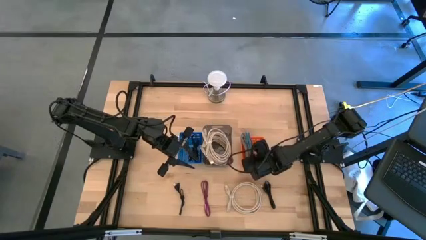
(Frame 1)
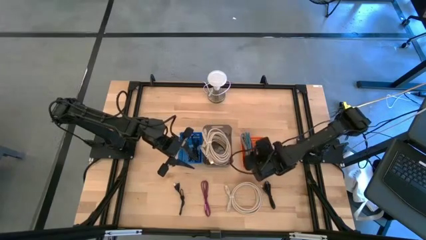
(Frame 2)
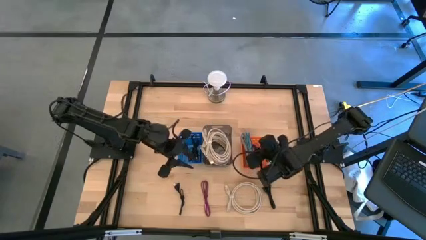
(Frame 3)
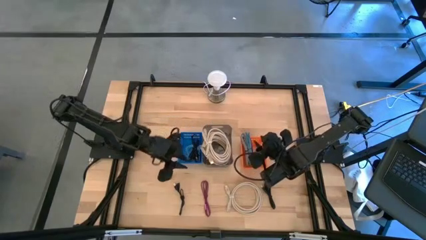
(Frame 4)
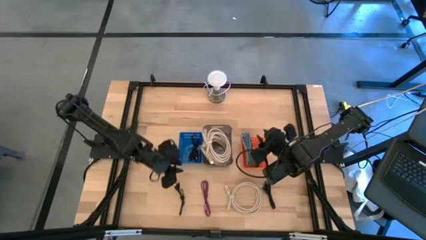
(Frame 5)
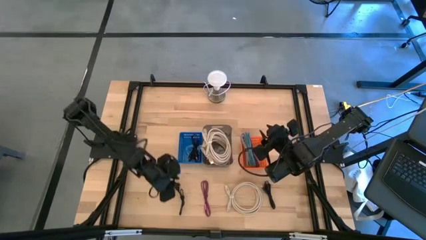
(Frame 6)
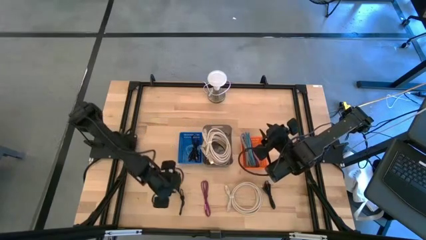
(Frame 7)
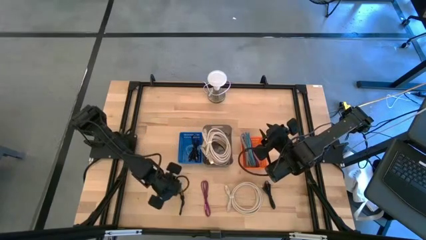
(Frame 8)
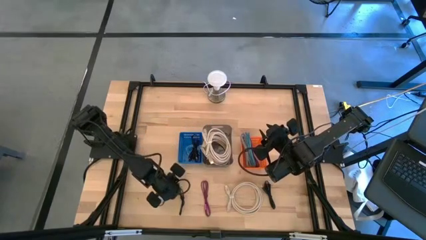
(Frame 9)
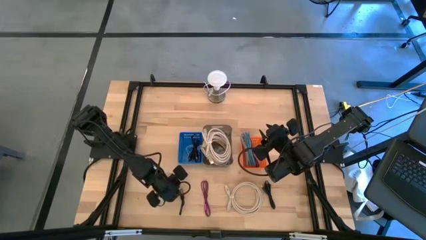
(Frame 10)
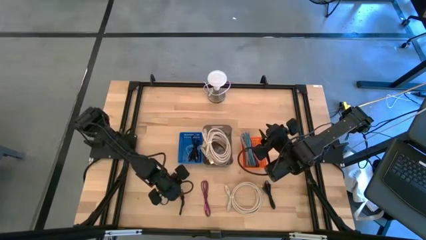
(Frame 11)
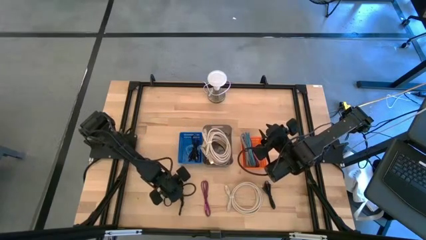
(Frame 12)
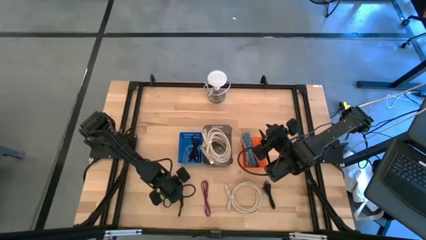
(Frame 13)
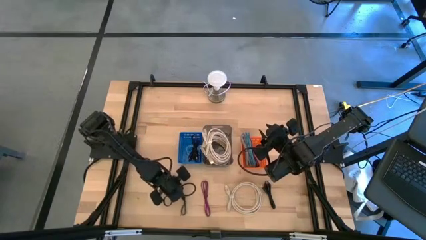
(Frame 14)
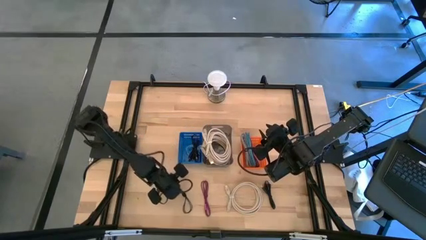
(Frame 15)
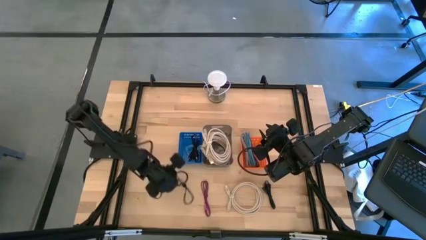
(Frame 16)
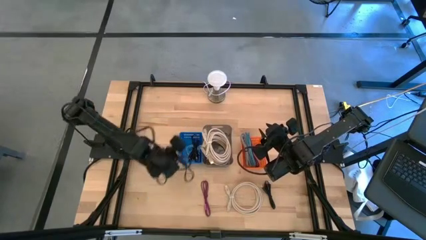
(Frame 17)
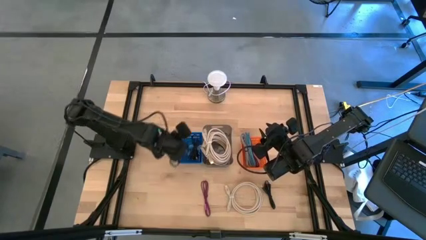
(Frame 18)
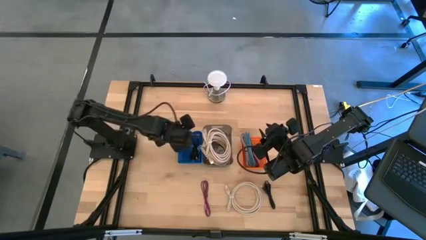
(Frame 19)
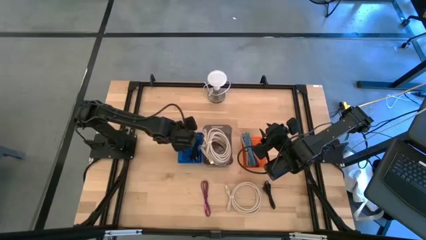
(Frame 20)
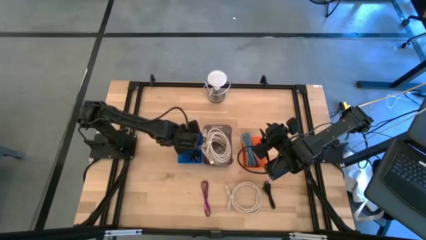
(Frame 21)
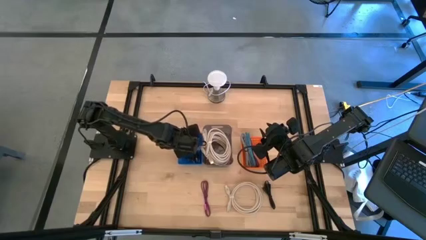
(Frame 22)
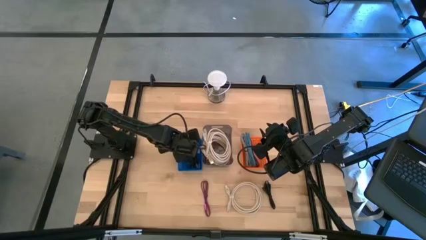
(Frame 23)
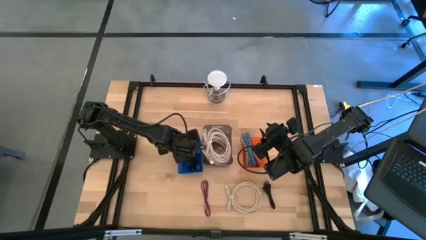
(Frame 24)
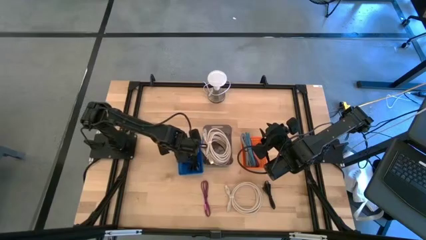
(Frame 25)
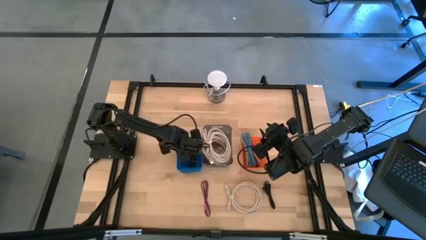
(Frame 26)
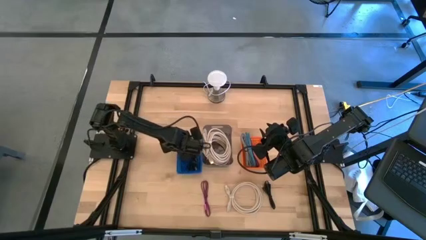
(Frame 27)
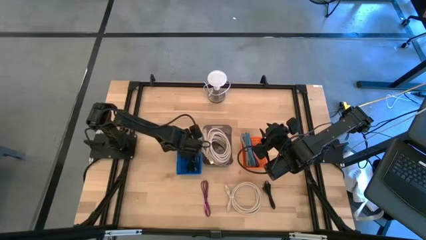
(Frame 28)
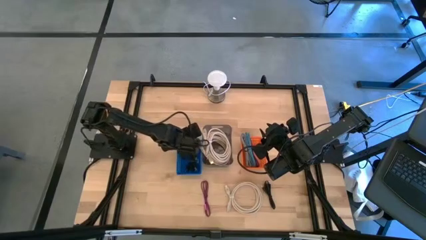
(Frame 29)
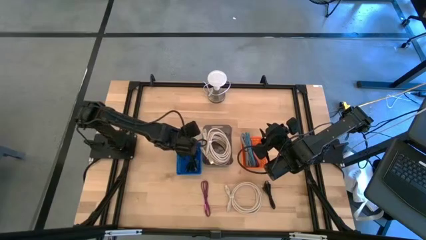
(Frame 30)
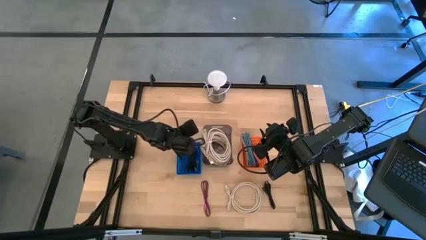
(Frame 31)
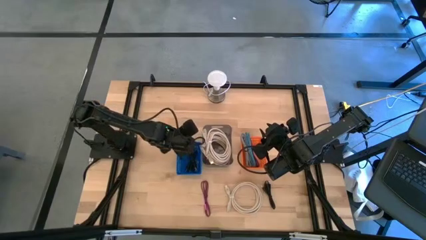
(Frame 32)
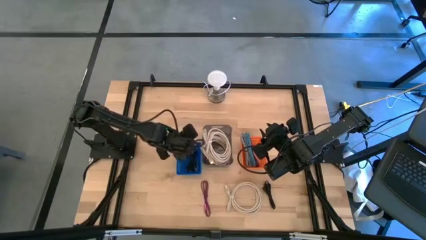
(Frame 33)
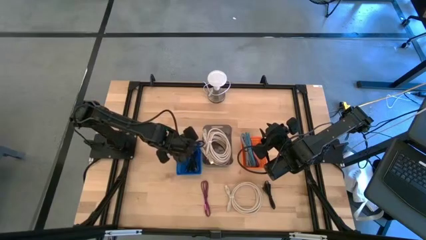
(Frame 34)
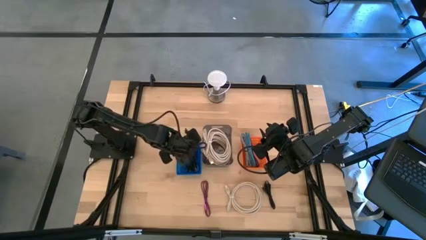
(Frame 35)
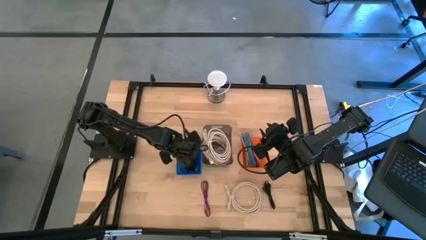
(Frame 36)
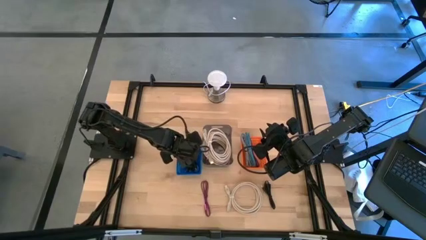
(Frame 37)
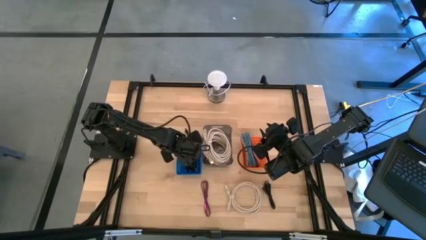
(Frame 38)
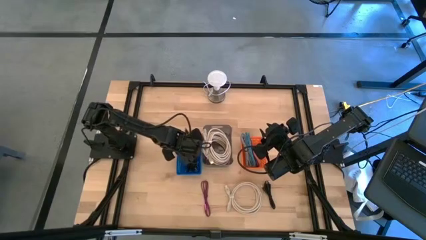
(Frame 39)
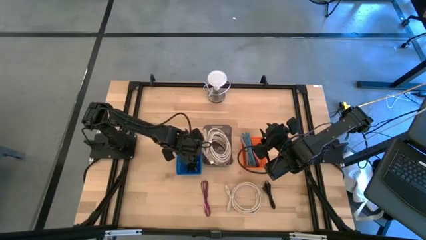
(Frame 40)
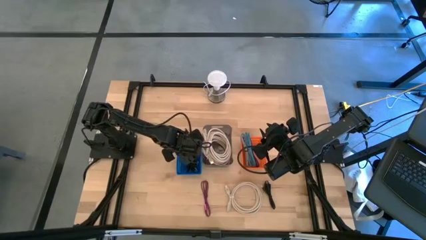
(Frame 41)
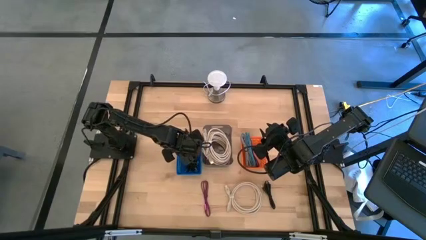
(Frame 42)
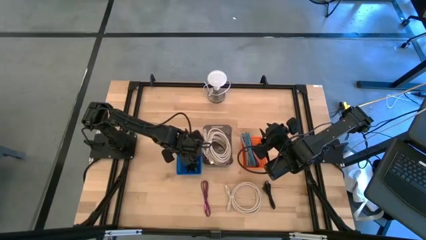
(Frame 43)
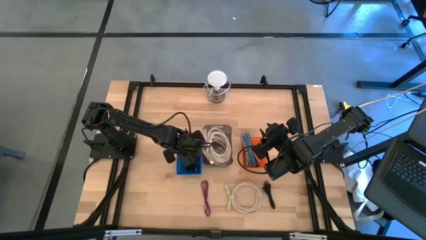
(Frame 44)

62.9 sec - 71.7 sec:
Task: Pick & Place USB Port
Put the black charger cable into the blue bin

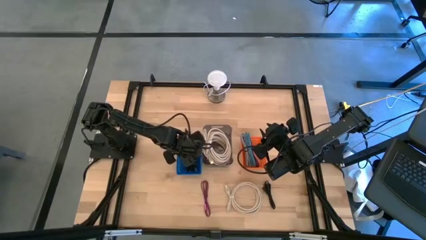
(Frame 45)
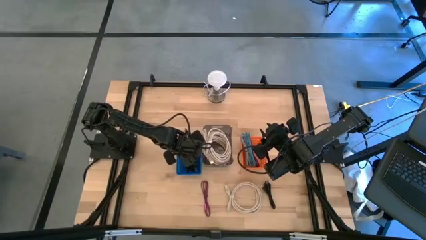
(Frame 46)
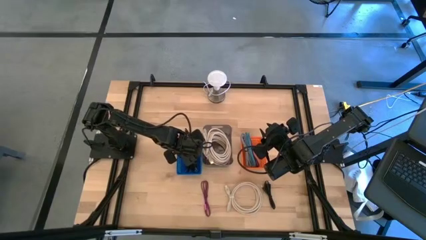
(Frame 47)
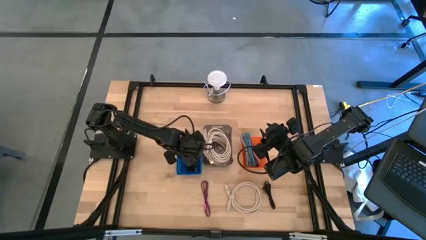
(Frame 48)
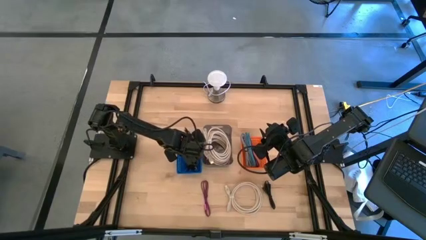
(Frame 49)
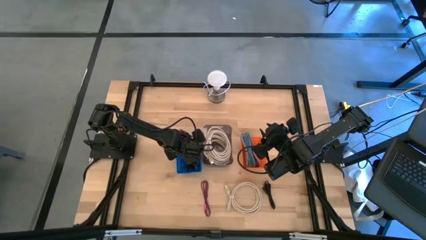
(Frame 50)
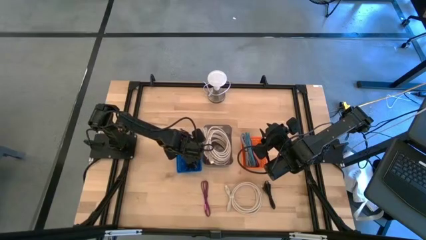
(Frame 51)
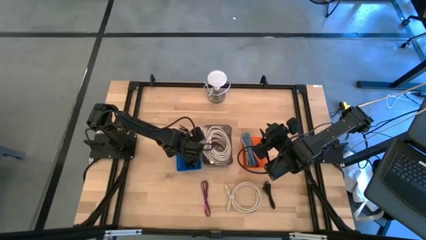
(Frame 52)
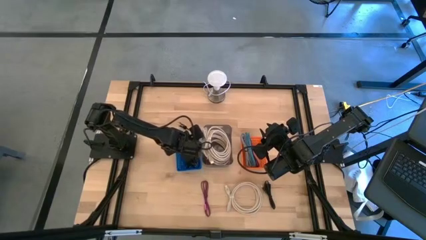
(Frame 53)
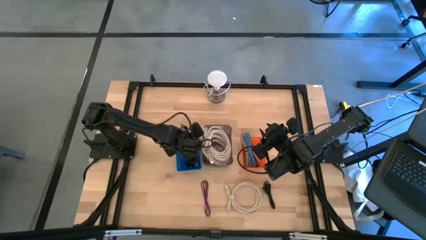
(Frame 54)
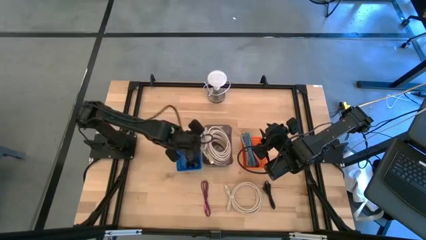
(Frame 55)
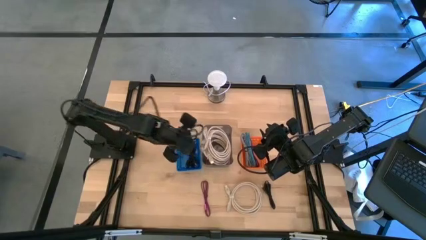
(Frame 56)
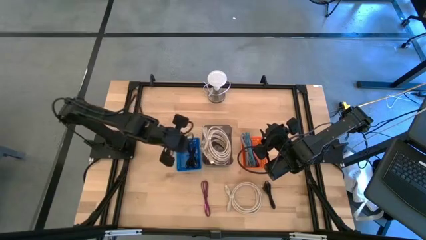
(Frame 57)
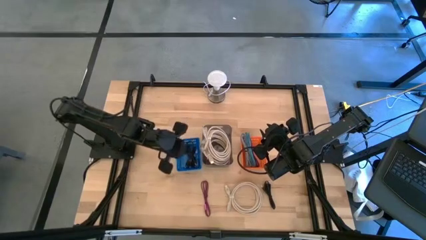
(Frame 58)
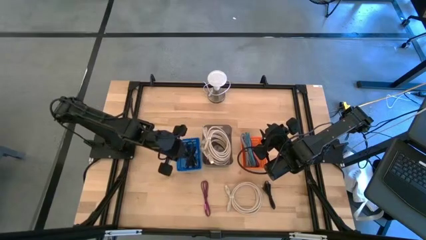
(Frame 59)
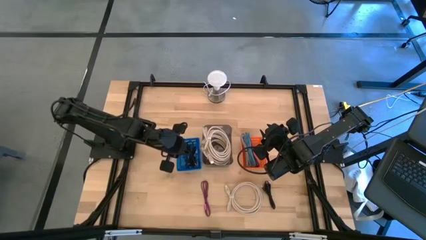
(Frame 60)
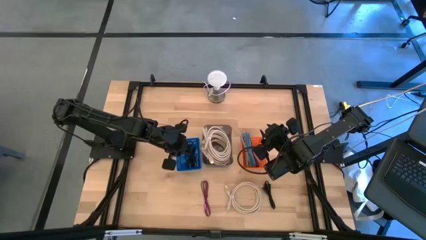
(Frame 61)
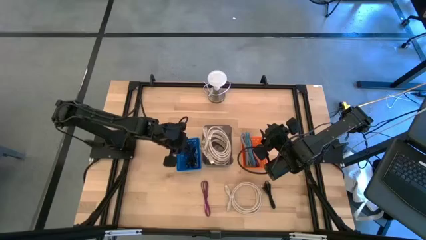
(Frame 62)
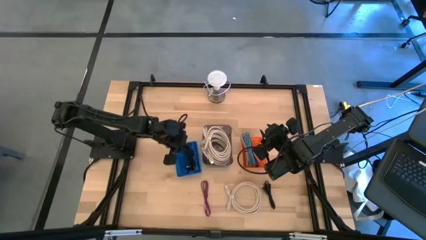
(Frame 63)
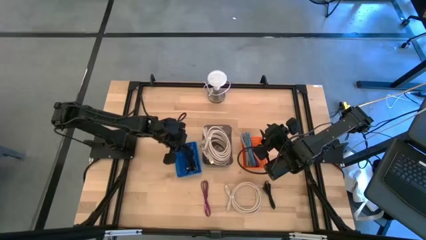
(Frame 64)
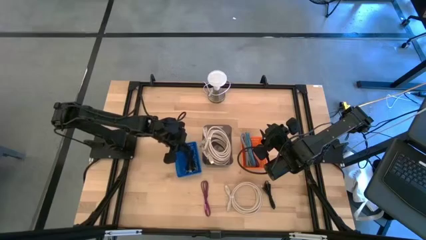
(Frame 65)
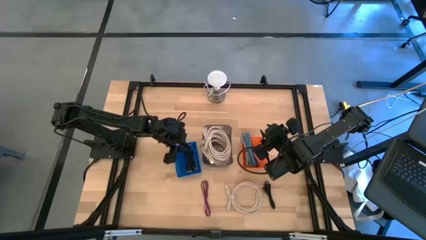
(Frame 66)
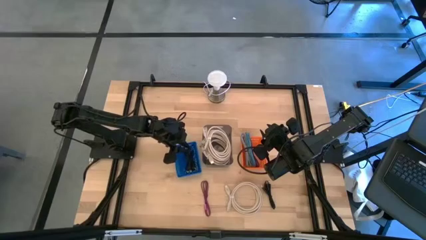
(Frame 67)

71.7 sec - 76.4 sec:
Put the black charger cable into the blue bin

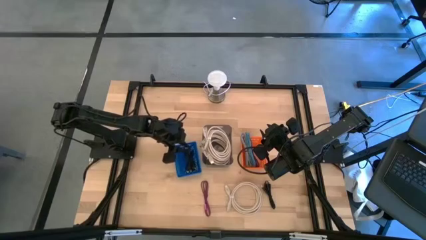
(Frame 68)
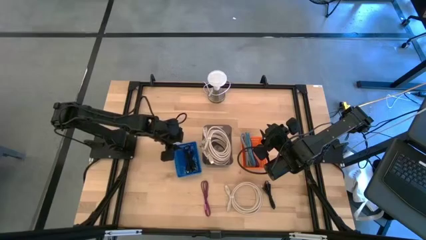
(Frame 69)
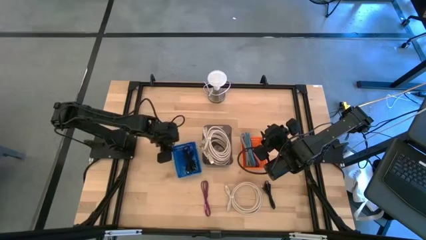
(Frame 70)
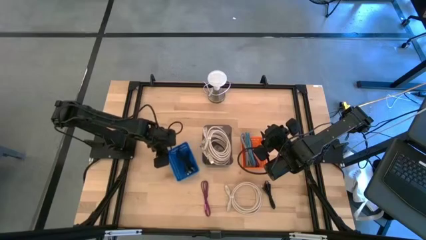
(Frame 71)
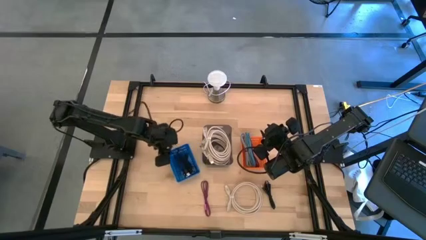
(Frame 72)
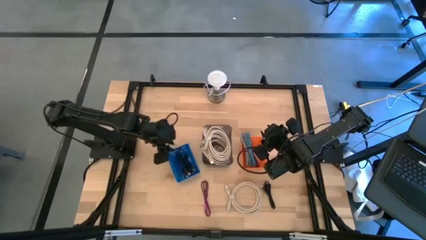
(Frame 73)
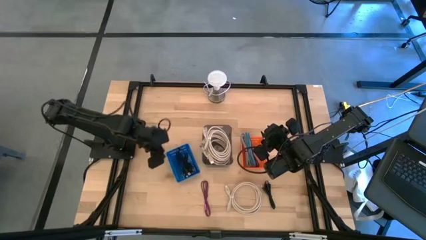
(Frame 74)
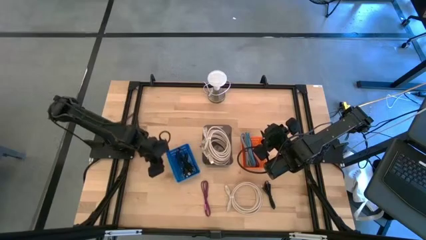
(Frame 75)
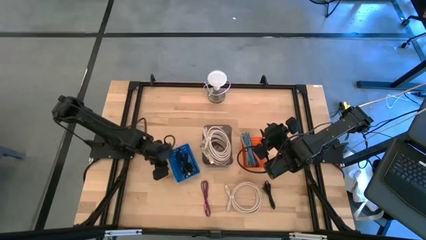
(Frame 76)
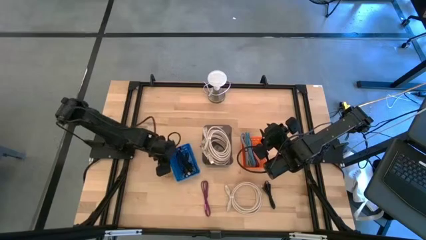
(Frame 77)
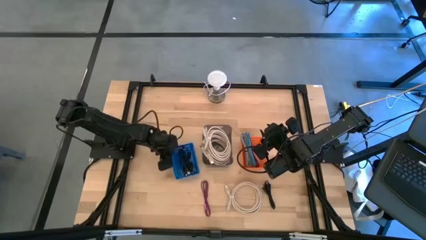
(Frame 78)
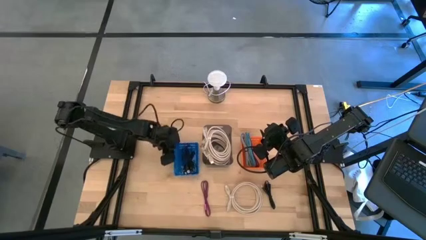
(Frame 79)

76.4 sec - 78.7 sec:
Adjust the blue bin
